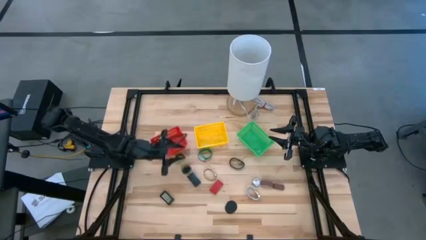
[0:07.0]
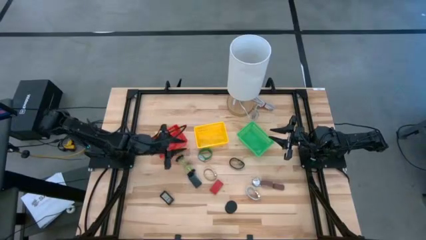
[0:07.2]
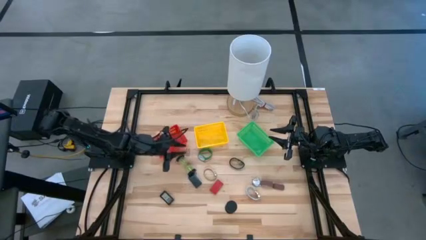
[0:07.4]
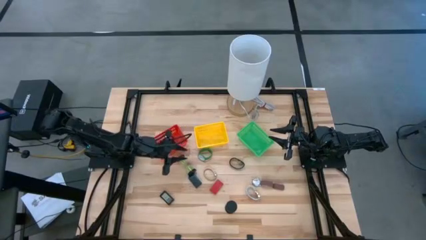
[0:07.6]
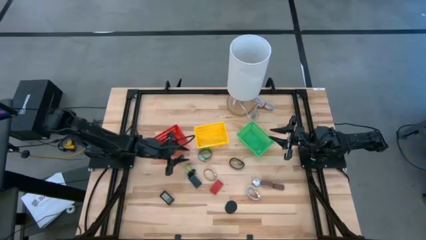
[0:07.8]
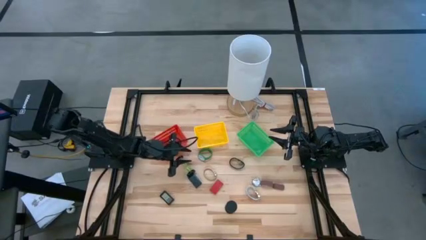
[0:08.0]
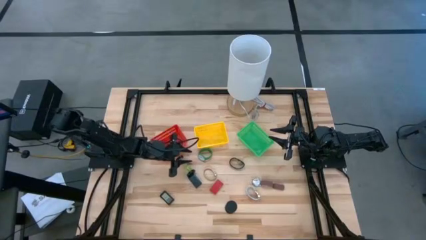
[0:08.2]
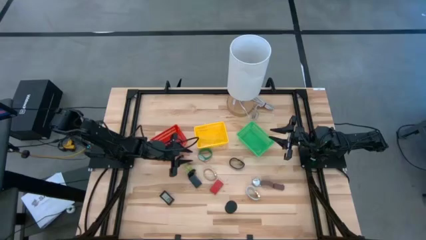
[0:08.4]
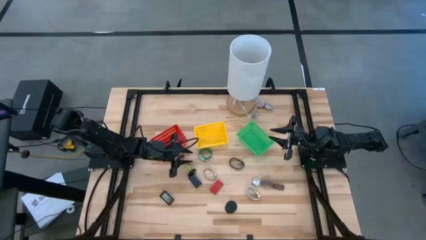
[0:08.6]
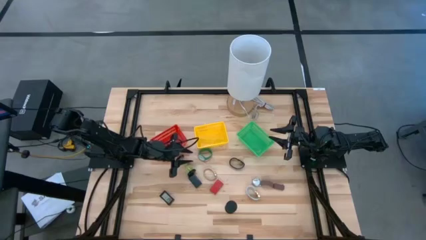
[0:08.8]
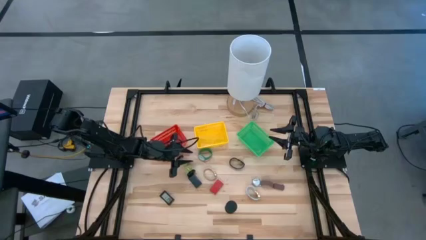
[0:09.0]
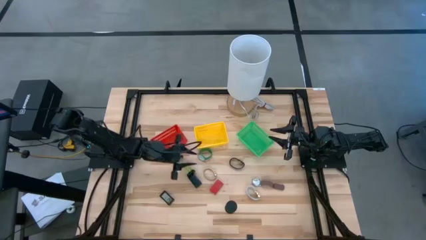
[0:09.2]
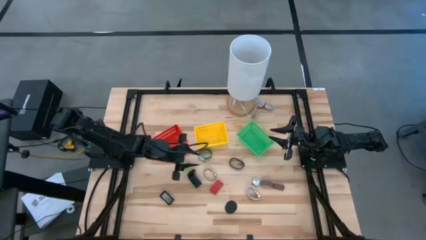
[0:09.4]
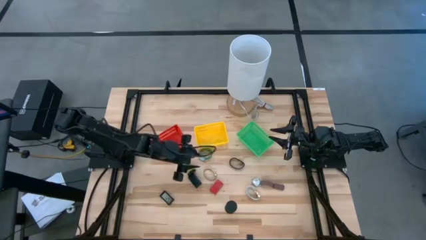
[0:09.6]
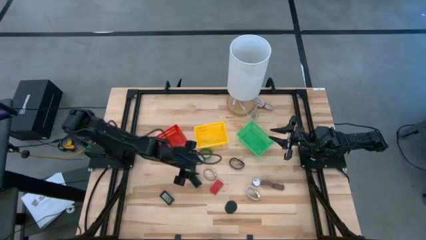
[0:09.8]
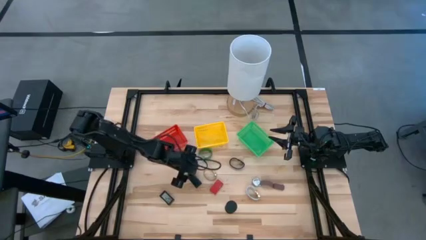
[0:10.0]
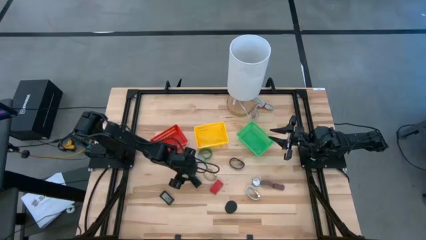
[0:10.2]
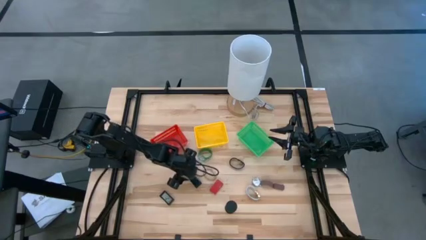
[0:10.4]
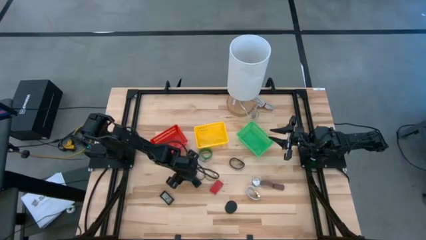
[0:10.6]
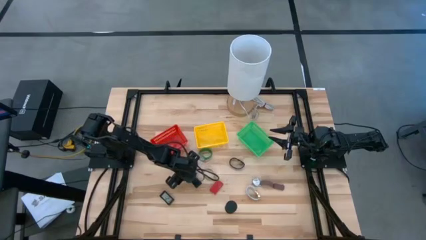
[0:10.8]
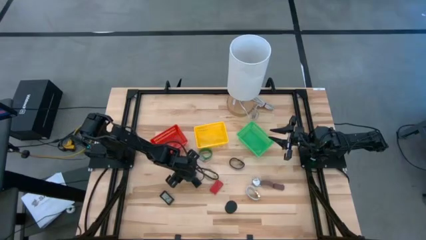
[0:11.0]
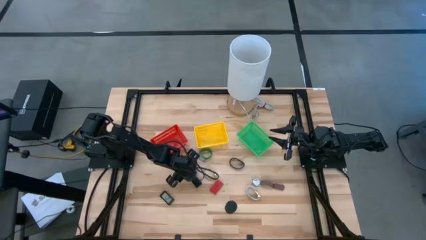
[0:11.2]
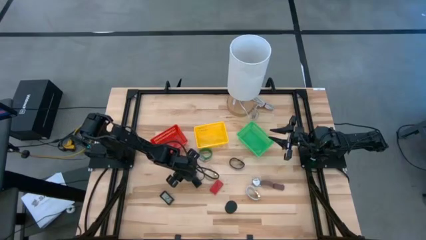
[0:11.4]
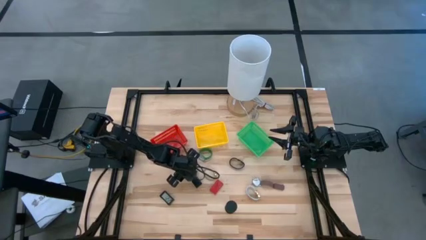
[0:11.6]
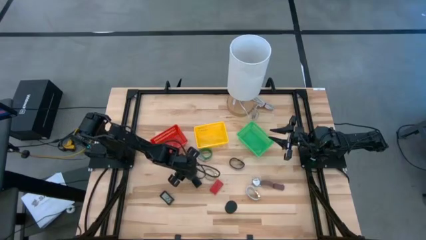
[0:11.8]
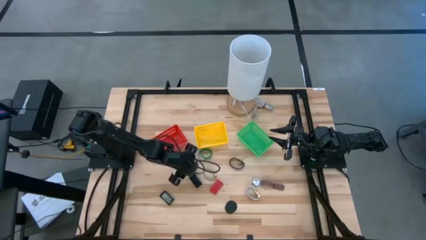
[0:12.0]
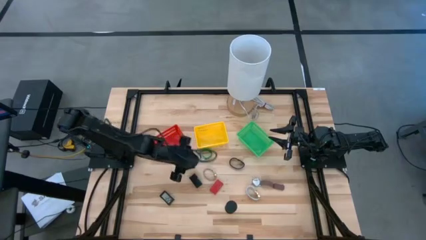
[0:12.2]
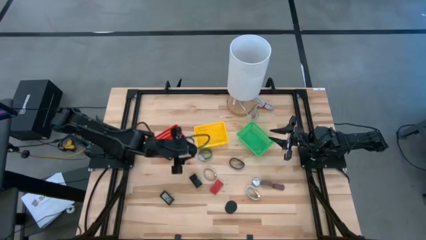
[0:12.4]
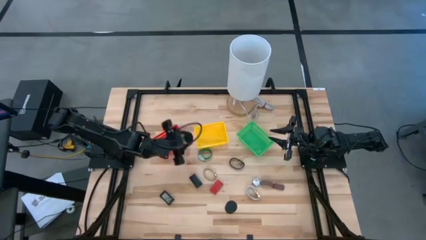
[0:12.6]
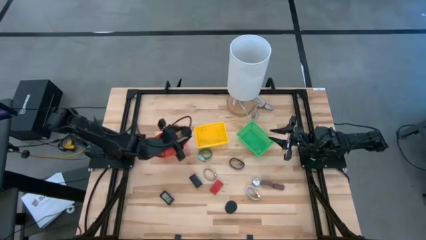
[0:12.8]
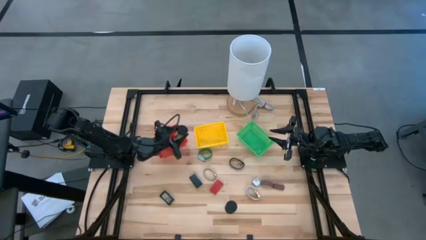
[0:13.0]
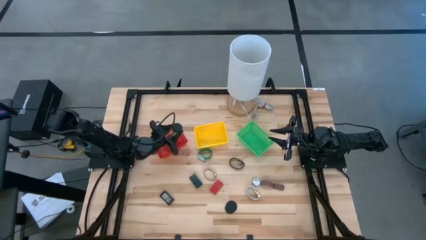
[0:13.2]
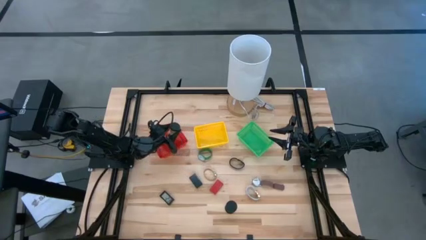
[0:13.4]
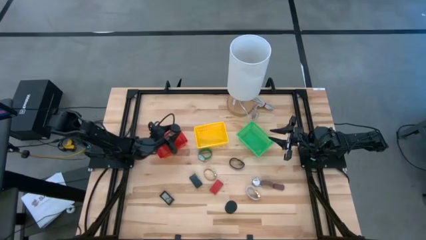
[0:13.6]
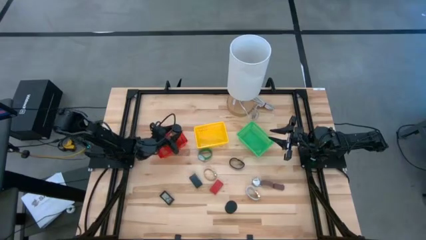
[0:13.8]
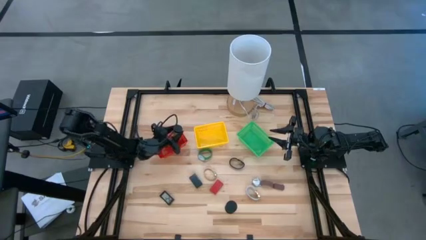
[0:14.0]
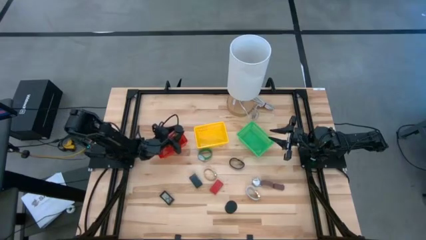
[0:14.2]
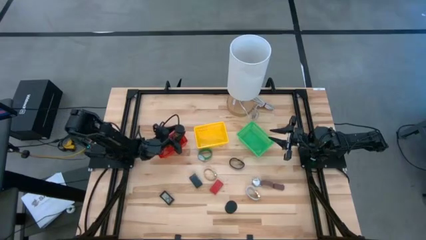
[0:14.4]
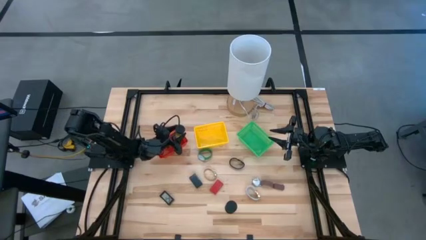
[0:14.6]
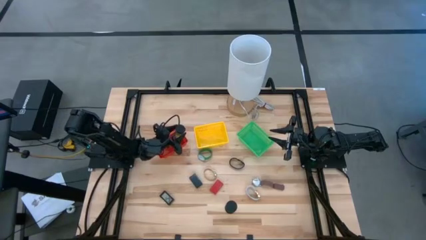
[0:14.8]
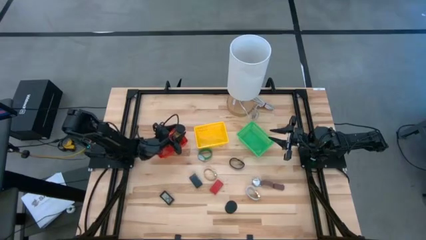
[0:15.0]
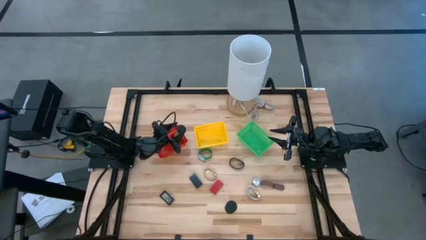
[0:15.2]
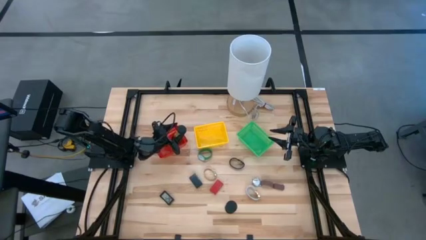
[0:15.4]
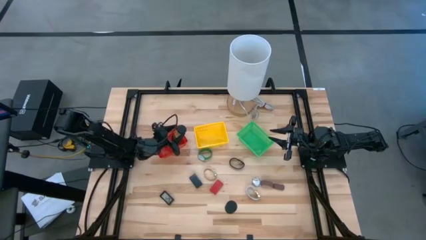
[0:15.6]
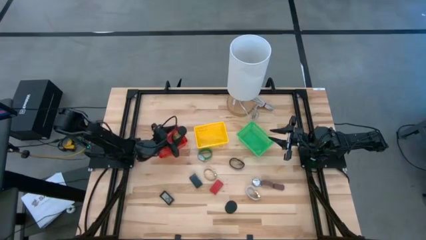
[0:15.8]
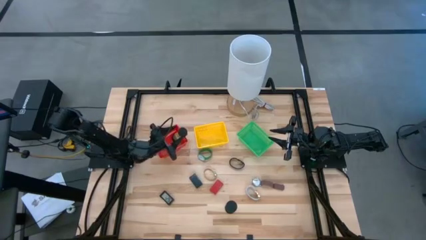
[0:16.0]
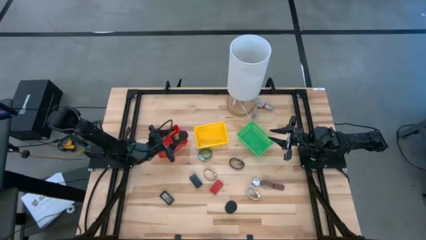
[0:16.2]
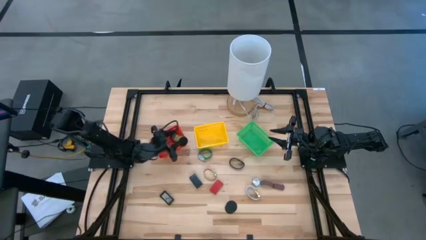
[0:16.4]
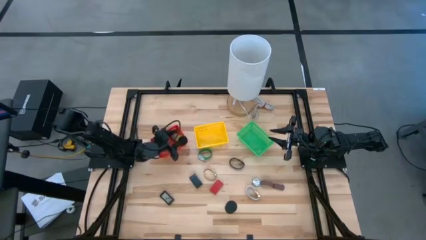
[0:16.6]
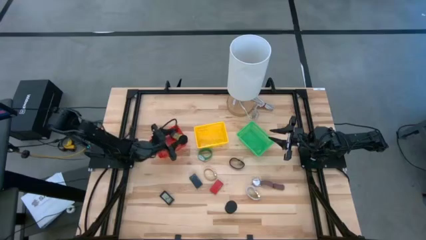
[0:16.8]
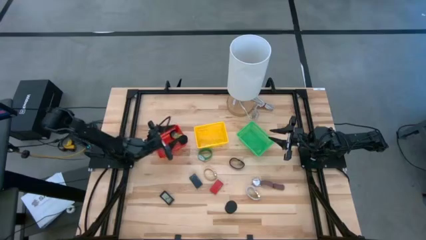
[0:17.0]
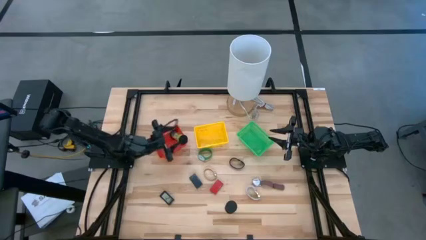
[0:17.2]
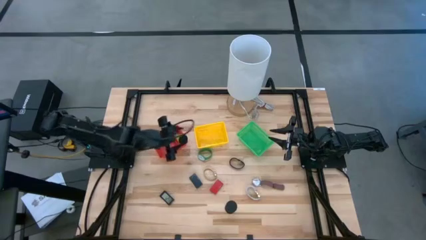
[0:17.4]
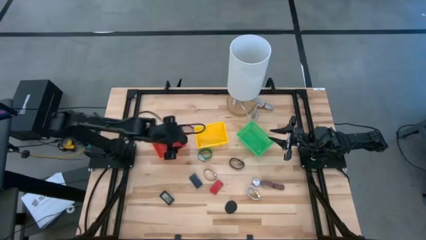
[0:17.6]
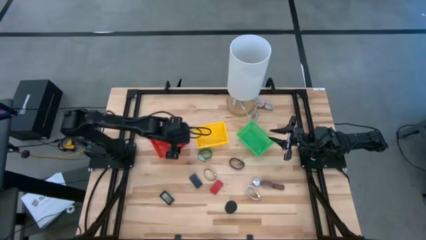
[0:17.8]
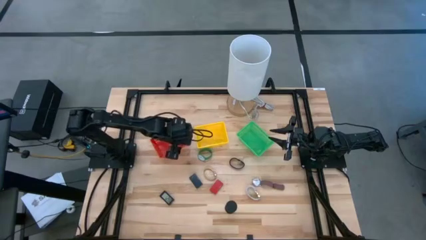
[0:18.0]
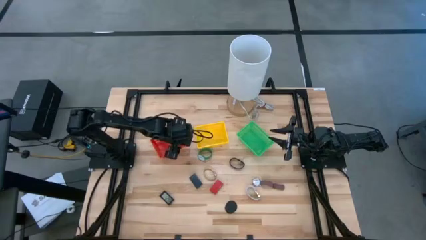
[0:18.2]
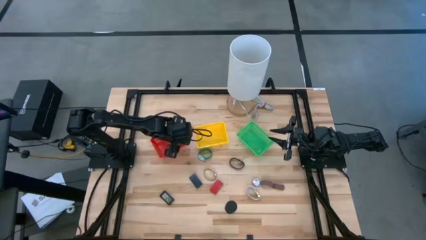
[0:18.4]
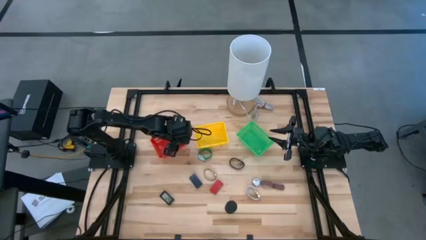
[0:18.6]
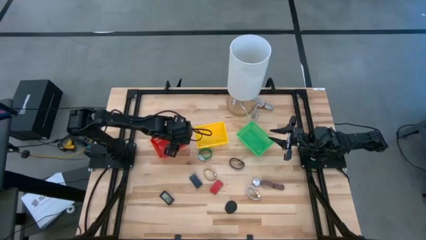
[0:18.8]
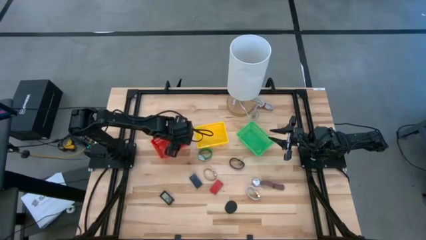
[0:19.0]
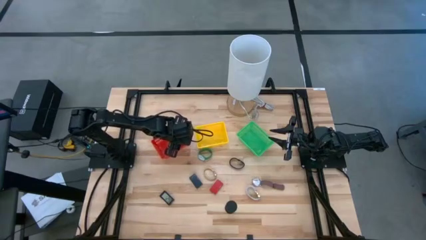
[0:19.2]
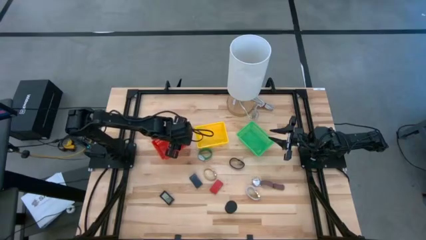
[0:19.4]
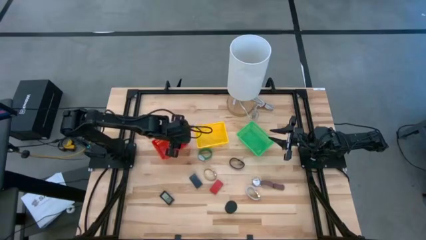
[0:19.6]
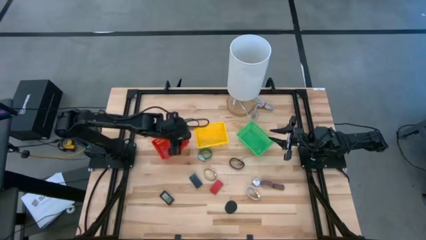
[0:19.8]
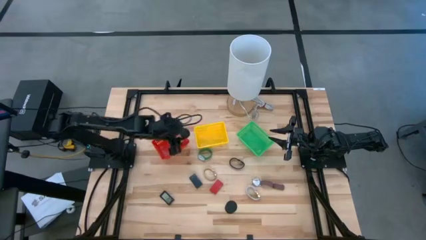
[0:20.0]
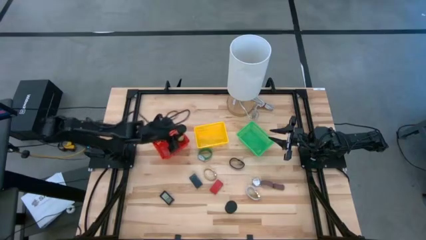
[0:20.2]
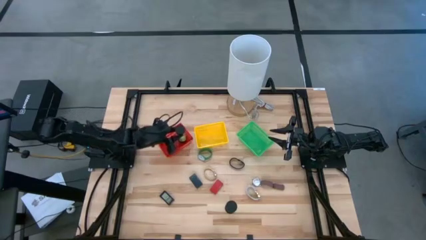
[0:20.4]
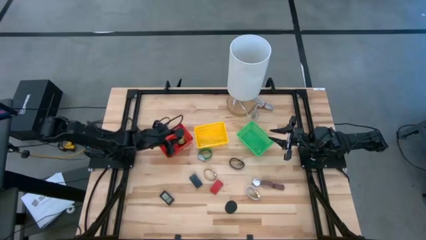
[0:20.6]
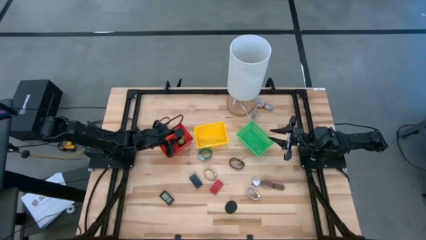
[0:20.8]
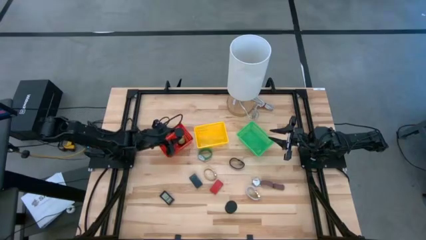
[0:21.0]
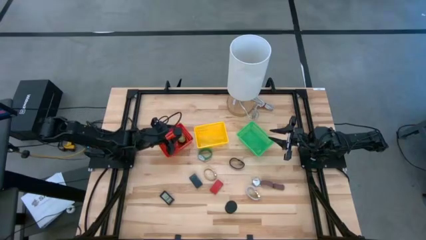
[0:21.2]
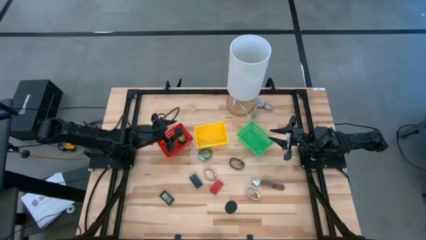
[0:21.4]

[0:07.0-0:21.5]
Task: Pick & Place Office items
Put the left black hourglass into the red basket

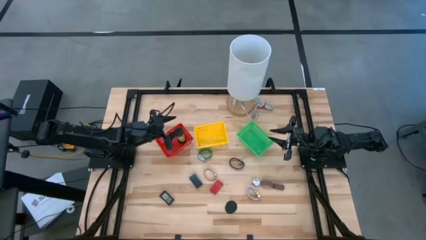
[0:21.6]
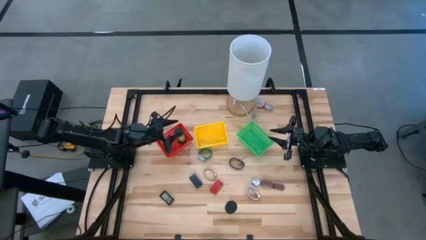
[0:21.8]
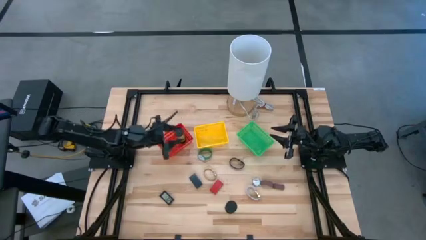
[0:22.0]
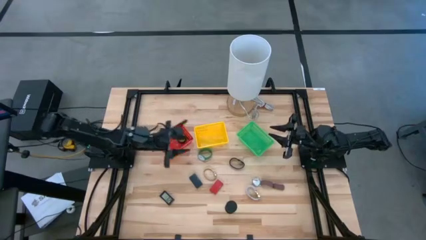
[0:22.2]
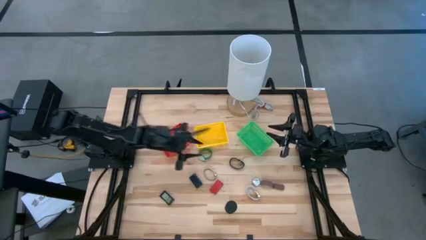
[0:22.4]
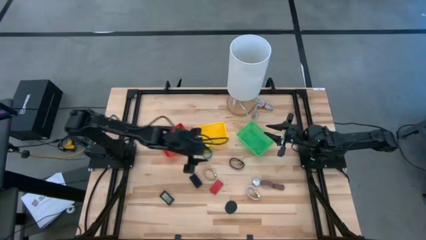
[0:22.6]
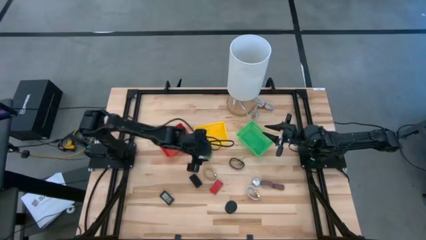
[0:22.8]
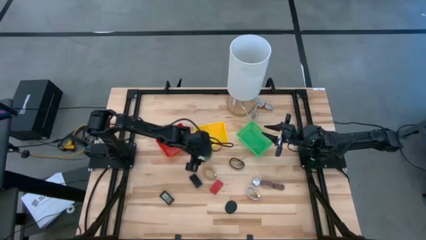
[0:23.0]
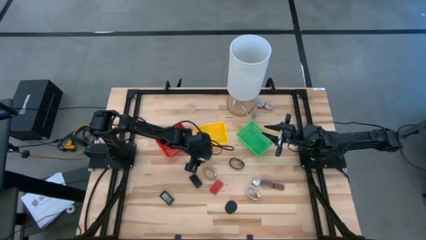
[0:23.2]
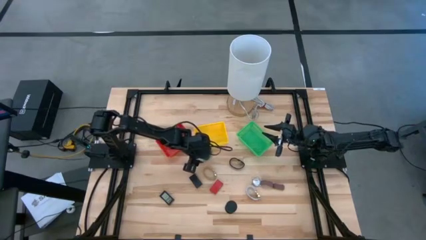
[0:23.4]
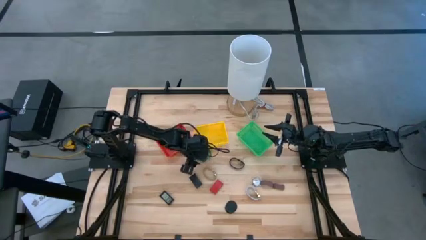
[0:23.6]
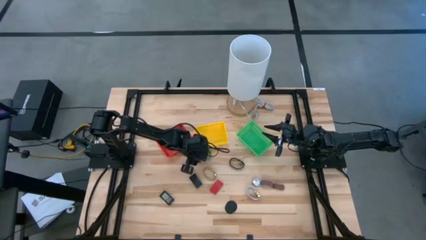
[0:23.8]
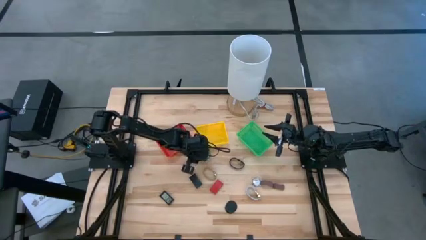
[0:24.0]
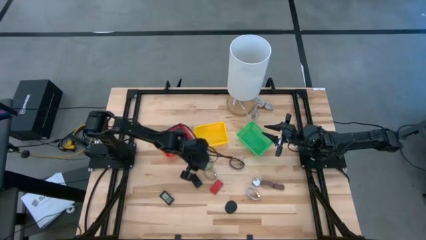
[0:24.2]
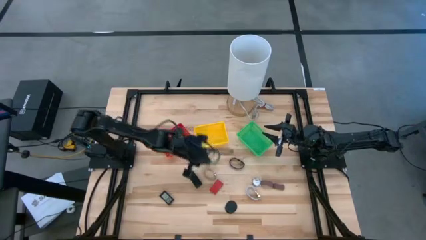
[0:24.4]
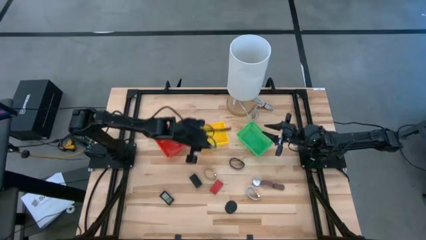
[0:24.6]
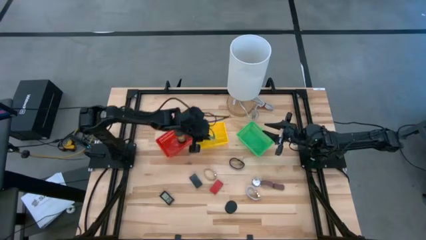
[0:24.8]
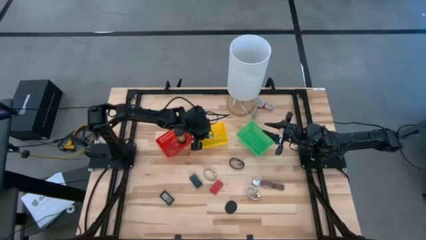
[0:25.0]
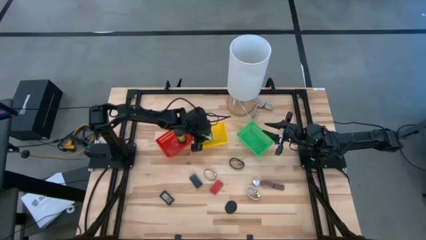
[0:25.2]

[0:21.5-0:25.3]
Put the green watch into the yellow basket
